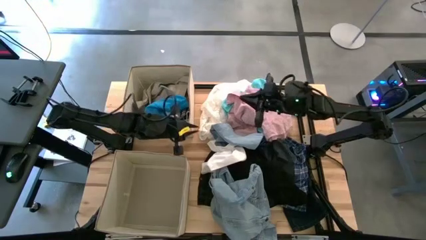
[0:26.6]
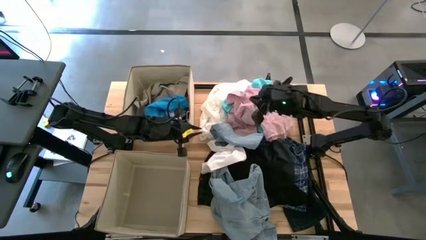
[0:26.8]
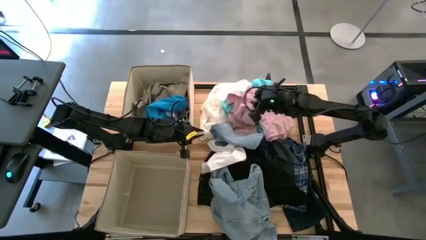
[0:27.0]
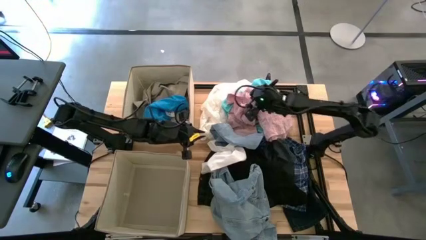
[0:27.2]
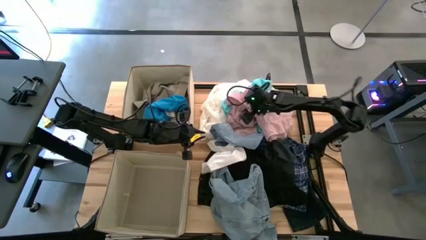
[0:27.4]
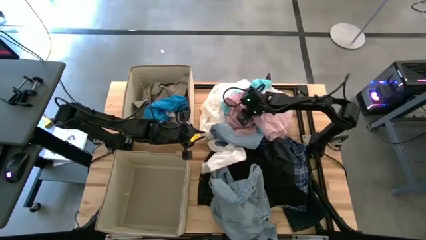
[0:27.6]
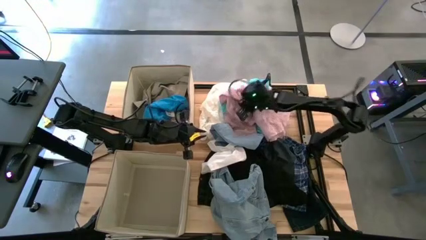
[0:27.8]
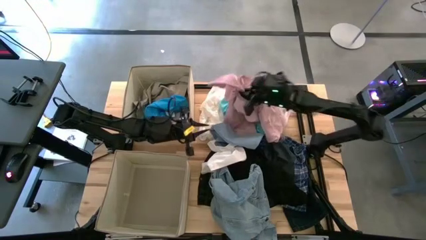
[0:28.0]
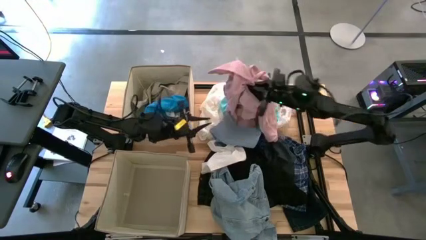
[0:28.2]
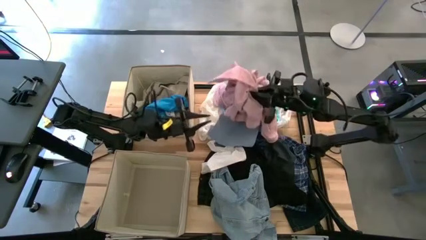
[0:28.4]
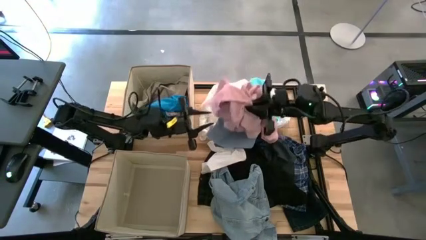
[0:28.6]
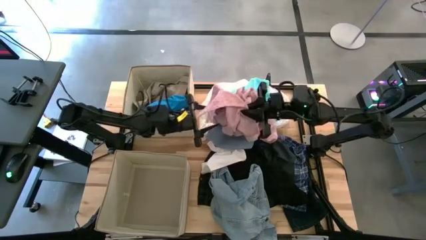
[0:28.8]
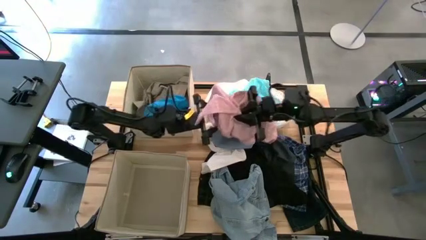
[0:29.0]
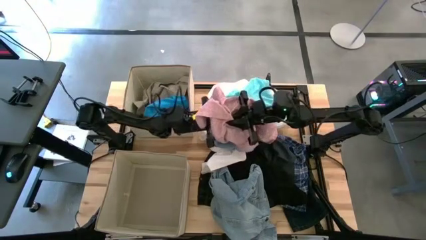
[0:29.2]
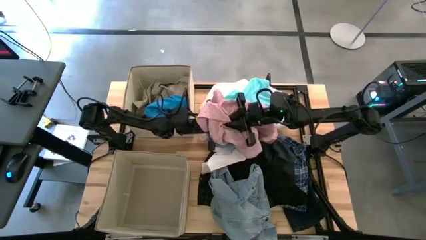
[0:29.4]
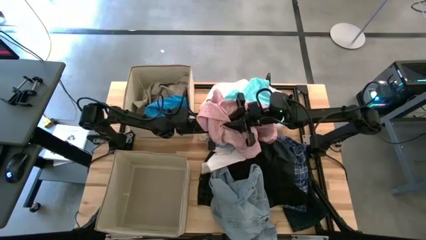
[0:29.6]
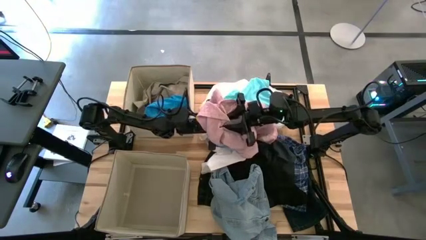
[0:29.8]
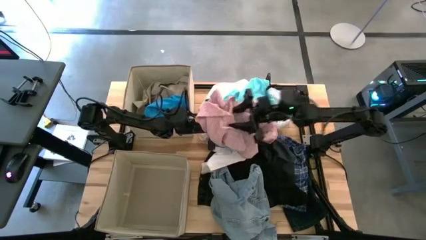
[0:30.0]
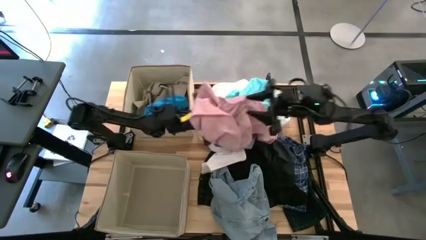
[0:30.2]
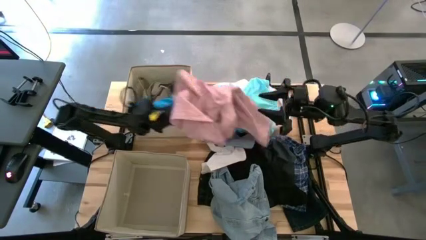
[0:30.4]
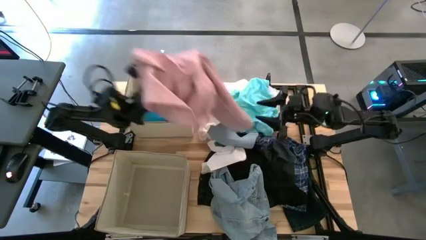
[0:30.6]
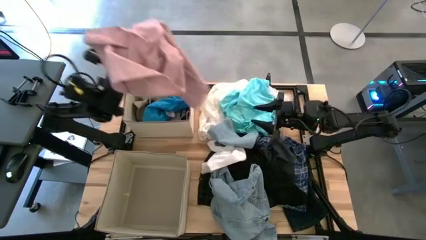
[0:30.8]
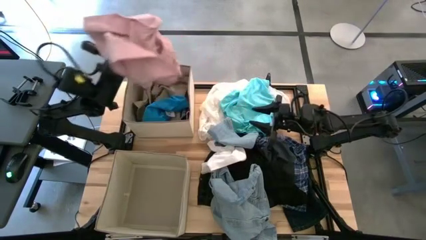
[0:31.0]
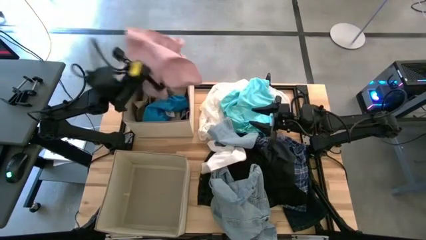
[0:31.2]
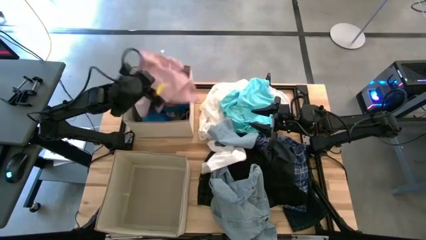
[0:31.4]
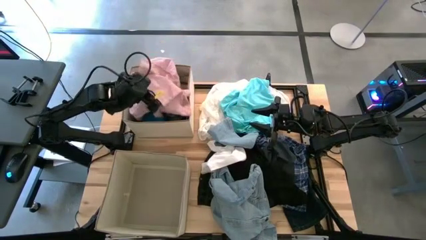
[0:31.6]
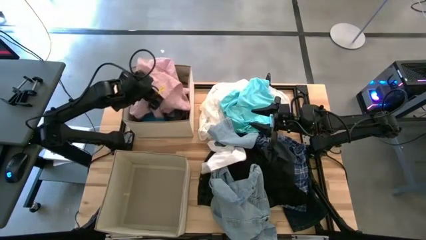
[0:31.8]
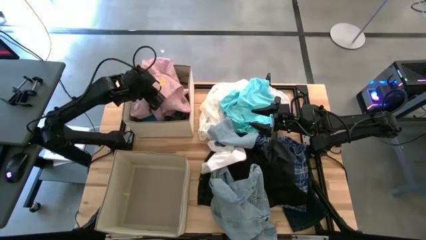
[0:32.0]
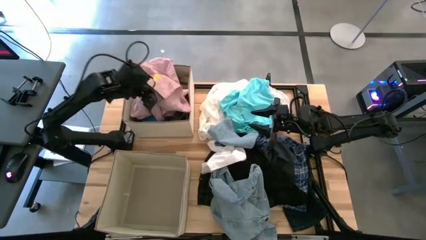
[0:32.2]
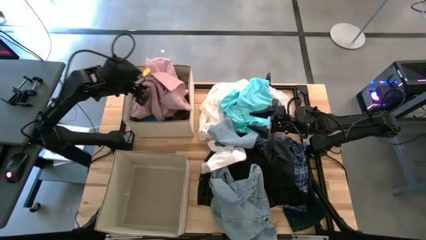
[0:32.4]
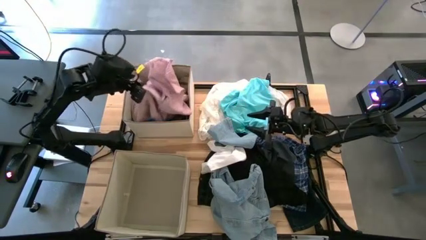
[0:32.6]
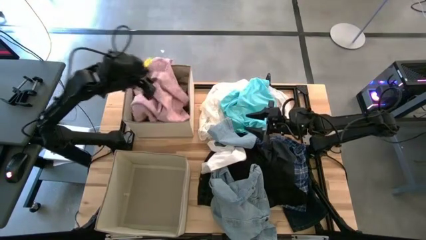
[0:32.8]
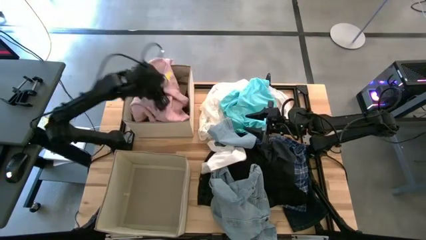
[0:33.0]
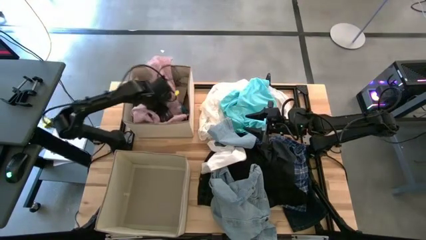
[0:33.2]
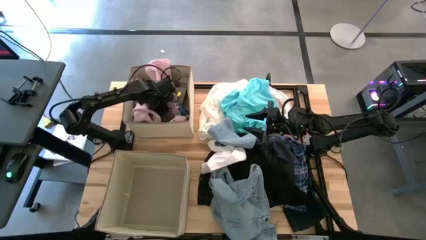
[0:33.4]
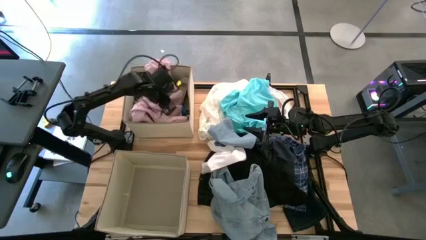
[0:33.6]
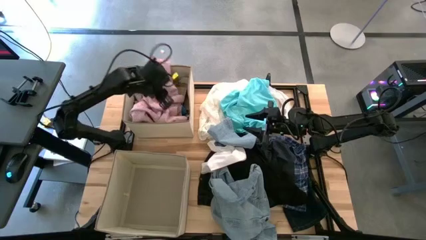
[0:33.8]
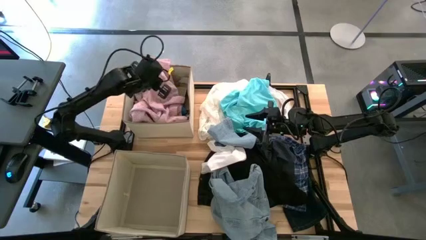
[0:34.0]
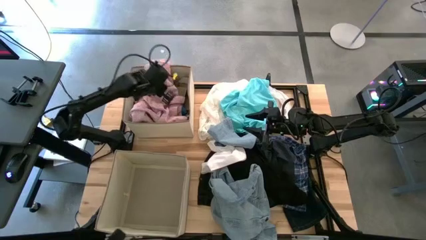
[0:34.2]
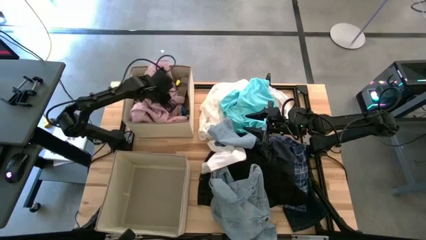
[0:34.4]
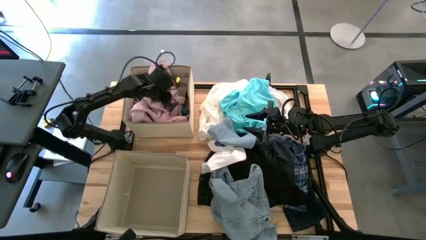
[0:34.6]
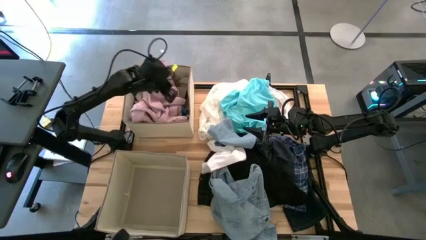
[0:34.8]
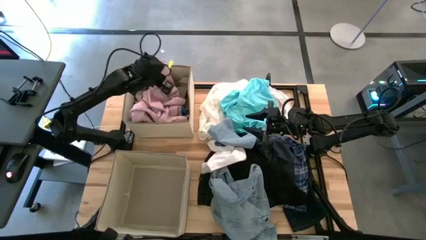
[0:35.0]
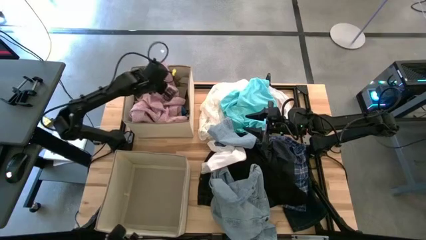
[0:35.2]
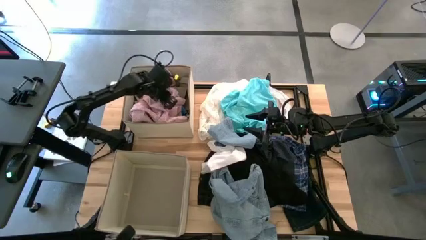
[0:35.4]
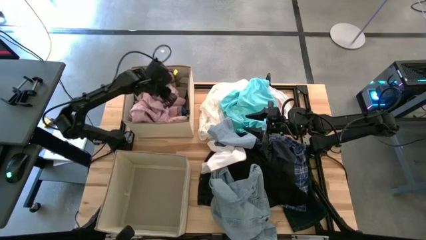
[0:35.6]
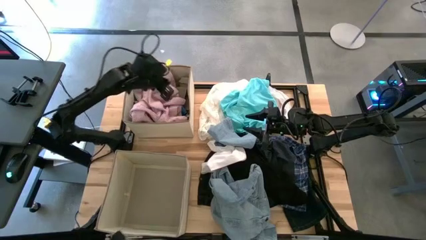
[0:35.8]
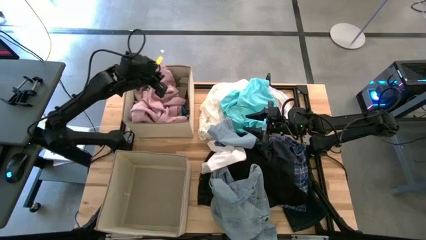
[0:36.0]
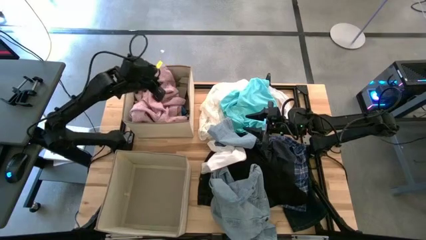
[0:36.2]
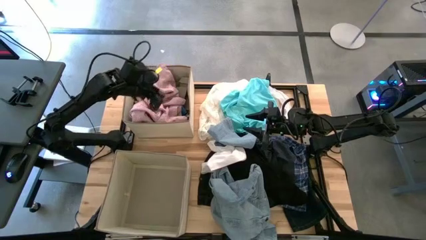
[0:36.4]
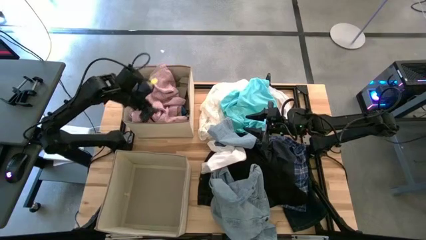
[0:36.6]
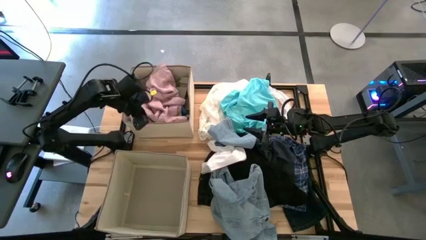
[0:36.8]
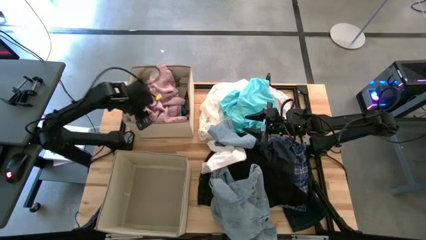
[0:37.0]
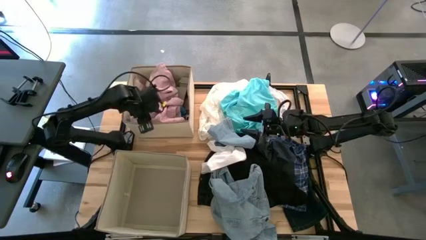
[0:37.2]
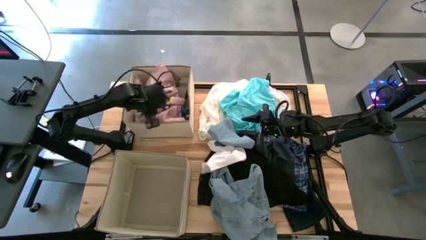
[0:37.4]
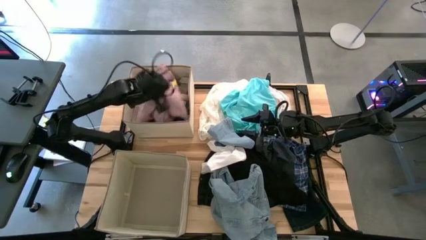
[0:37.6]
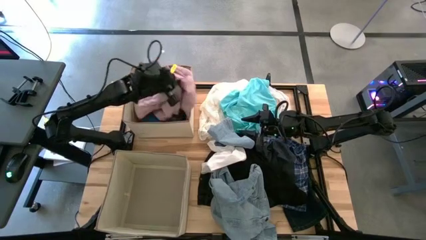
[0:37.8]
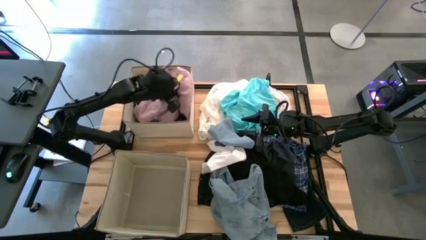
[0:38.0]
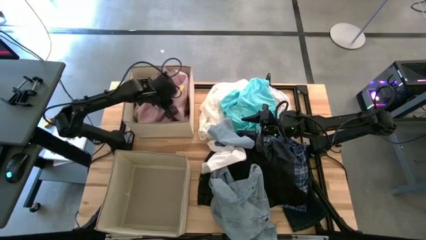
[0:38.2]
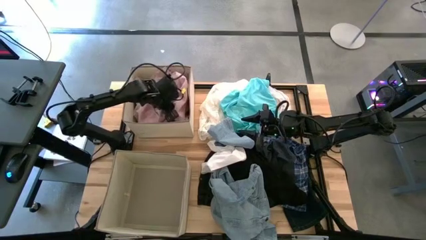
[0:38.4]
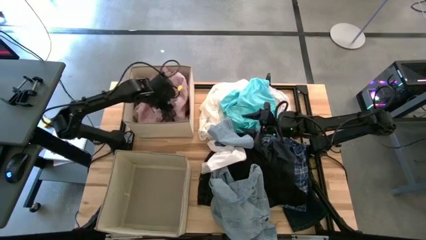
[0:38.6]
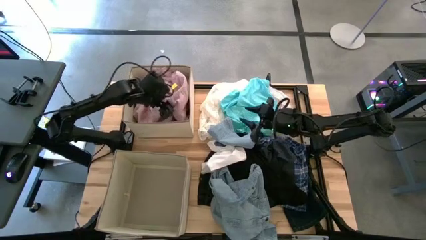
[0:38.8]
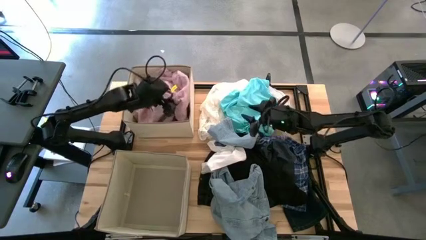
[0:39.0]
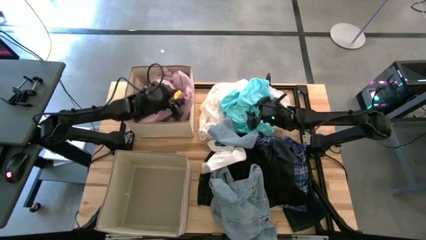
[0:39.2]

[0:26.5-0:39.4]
Task: Sort clothes
Put the pink shirt into the top brown laundry organizer

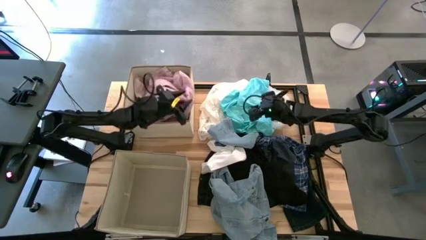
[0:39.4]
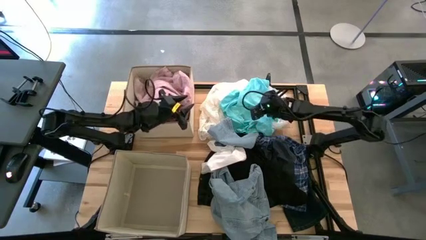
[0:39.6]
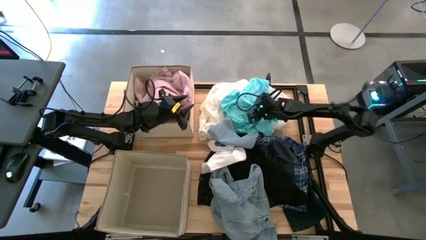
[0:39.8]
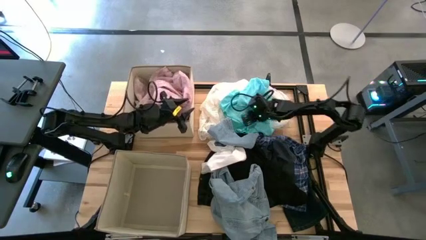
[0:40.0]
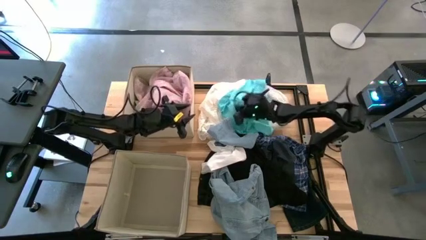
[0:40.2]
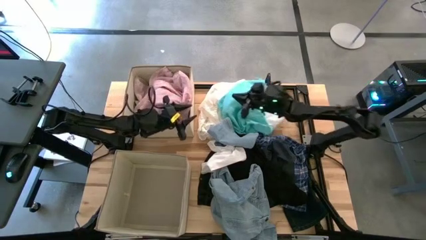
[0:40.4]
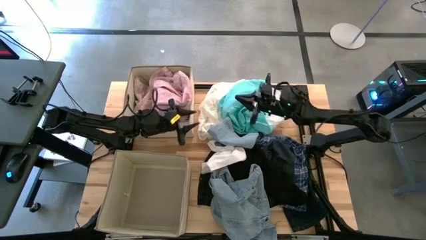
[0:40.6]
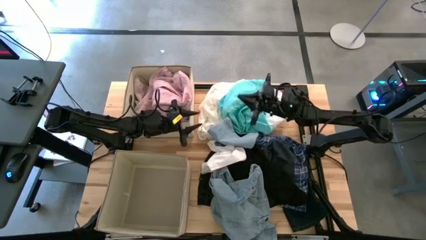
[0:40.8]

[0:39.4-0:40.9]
Put the blue shorts into the top brown laundry organizer

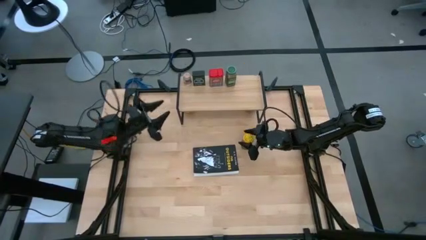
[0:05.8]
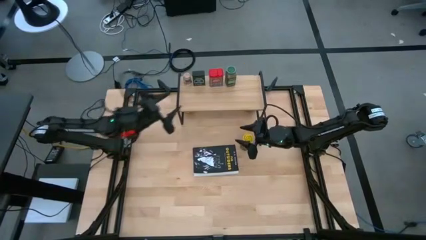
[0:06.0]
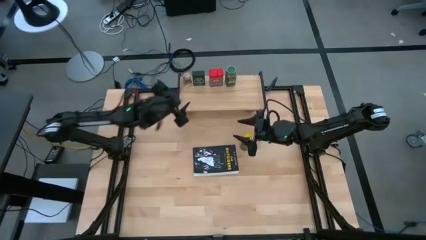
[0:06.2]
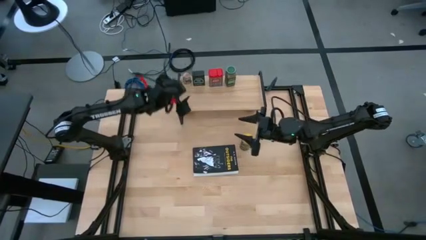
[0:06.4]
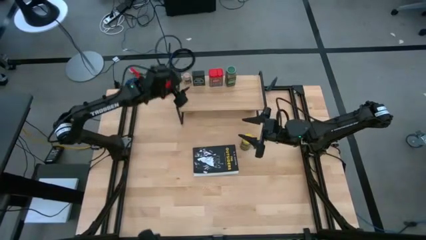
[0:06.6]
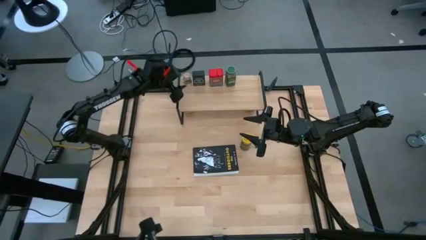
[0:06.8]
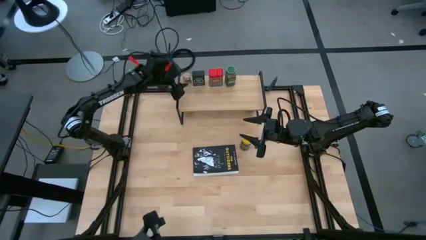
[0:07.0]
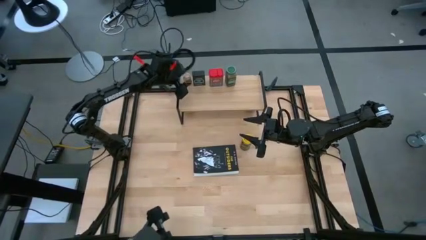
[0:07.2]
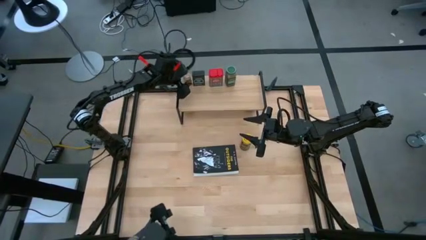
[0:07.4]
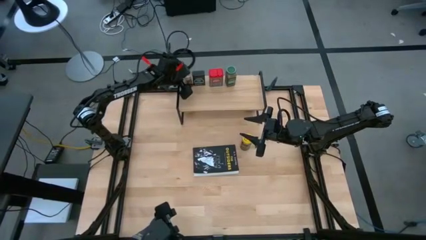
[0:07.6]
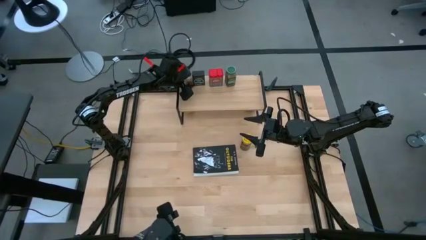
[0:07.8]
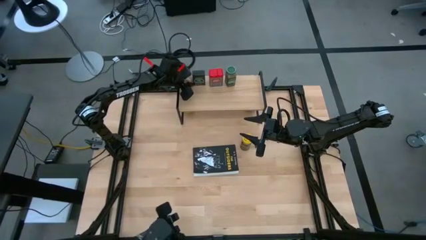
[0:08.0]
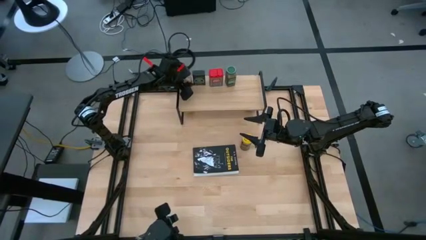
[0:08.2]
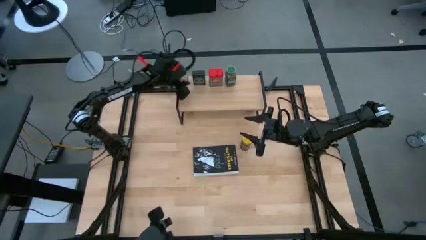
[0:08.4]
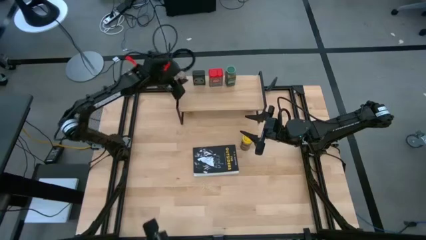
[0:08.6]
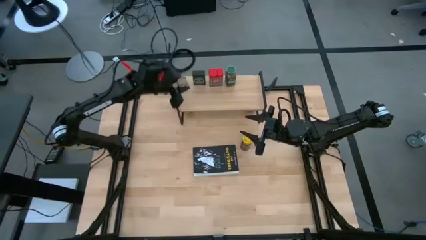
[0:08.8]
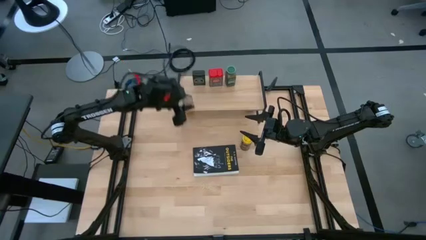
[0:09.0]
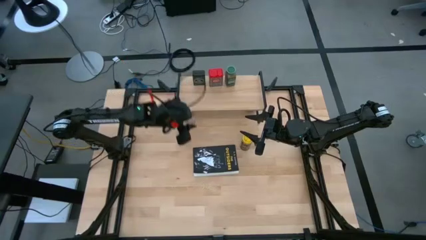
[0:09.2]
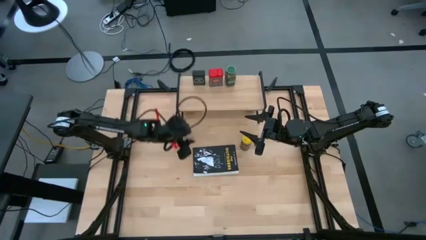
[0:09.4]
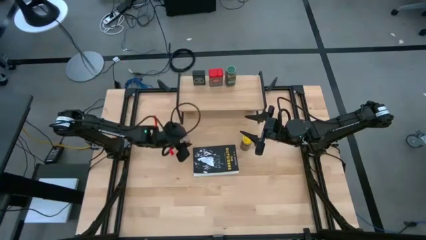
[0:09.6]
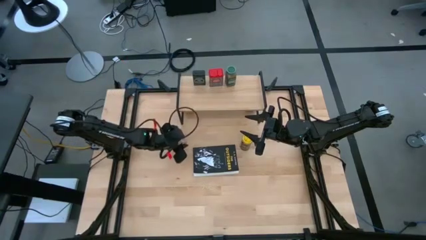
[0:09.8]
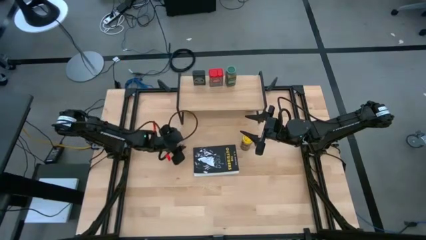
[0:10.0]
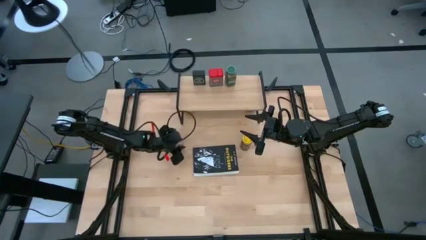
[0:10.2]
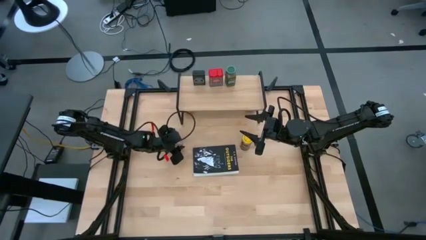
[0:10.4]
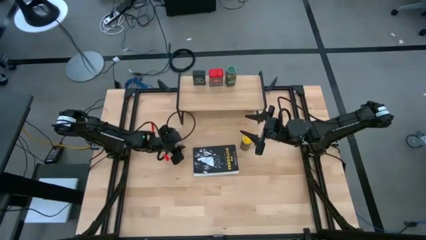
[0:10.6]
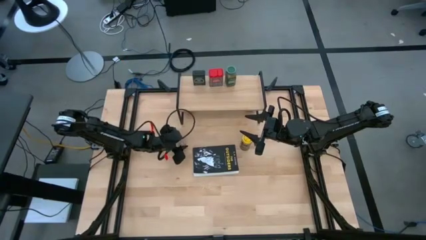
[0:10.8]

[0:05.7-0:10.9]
Task: Shelf spices
Remove the transparent seasoning bottle from the shelf
